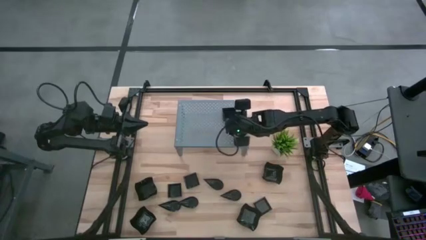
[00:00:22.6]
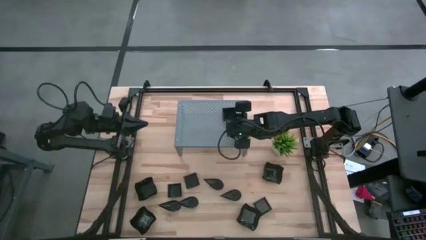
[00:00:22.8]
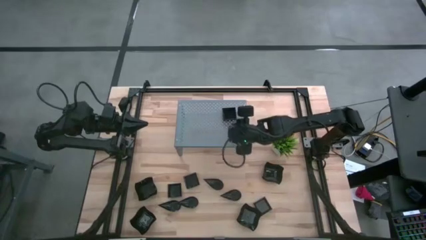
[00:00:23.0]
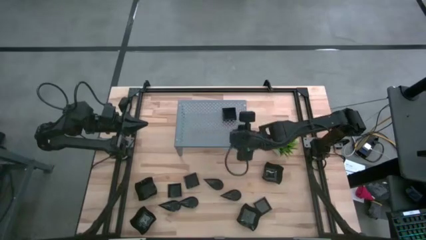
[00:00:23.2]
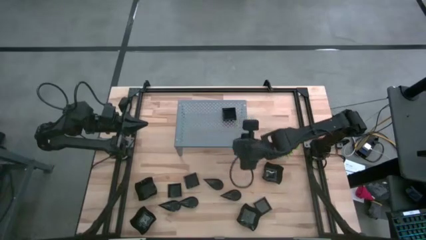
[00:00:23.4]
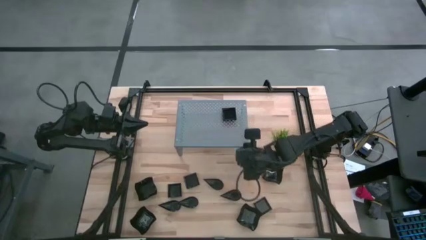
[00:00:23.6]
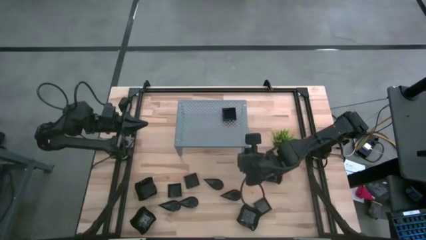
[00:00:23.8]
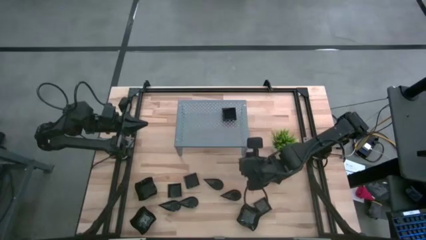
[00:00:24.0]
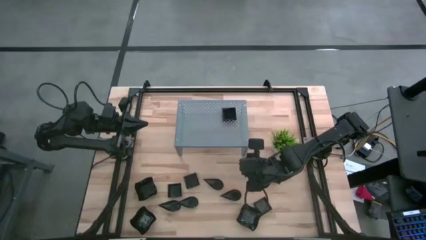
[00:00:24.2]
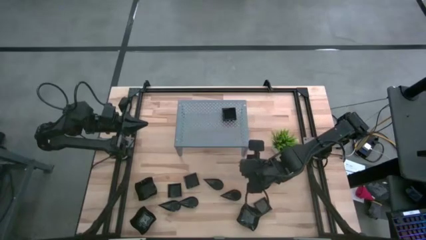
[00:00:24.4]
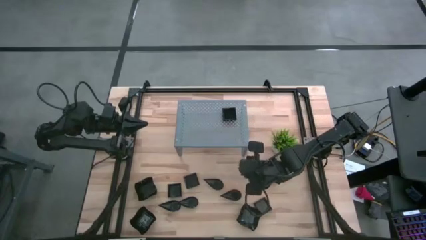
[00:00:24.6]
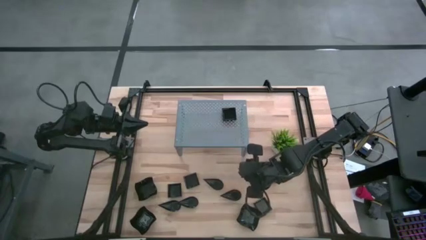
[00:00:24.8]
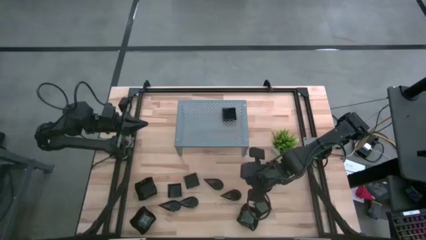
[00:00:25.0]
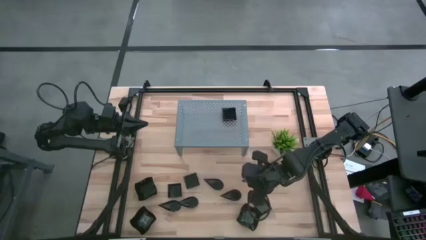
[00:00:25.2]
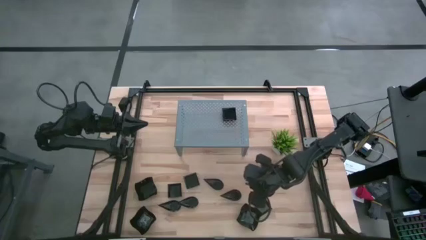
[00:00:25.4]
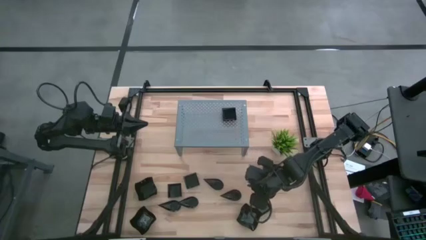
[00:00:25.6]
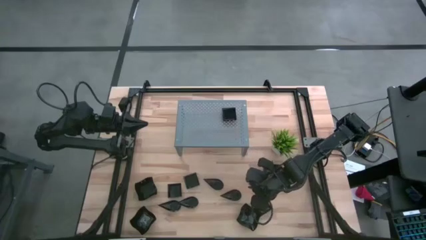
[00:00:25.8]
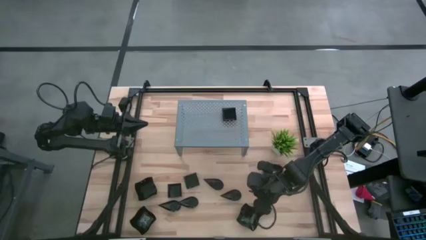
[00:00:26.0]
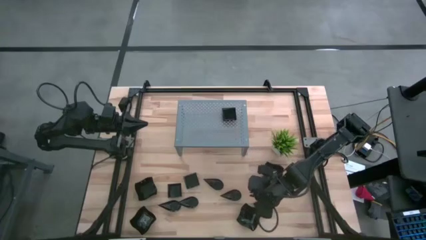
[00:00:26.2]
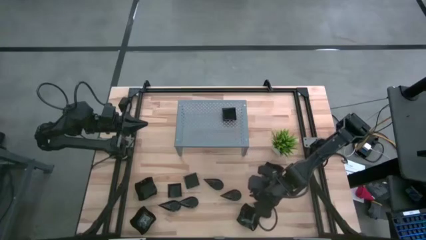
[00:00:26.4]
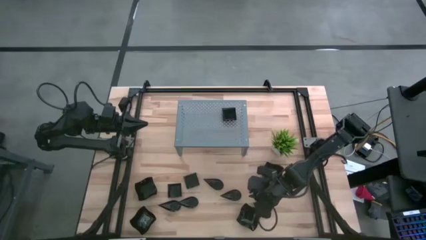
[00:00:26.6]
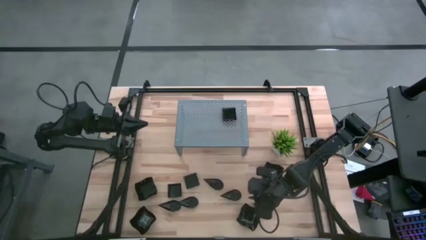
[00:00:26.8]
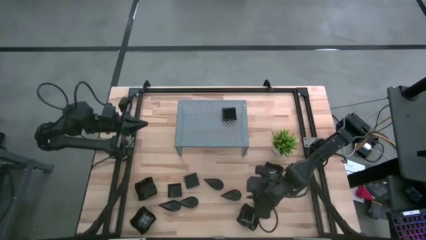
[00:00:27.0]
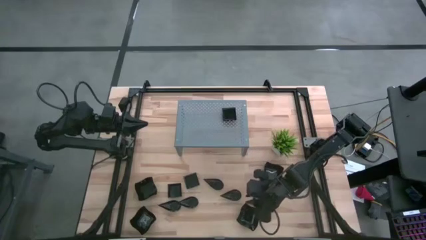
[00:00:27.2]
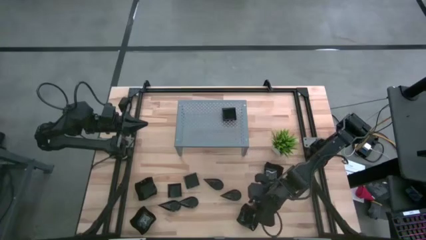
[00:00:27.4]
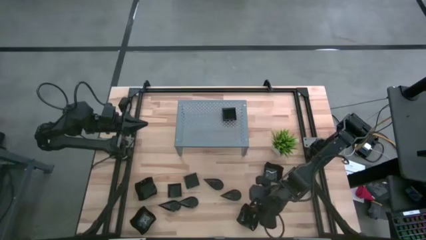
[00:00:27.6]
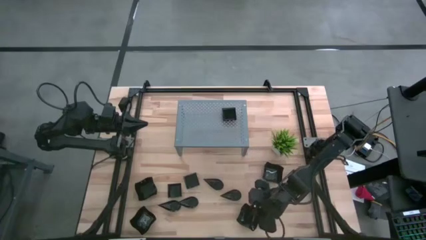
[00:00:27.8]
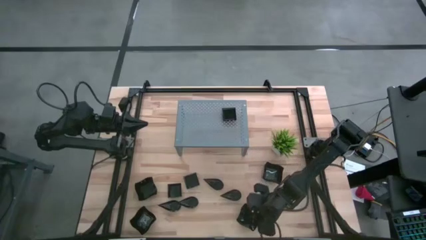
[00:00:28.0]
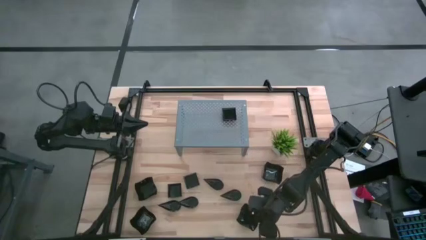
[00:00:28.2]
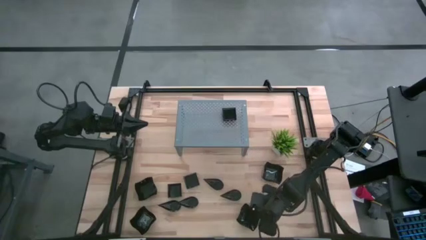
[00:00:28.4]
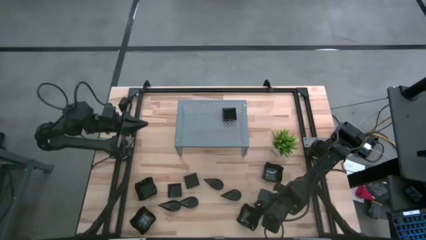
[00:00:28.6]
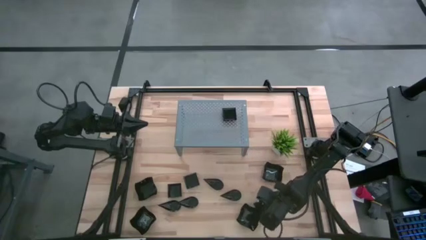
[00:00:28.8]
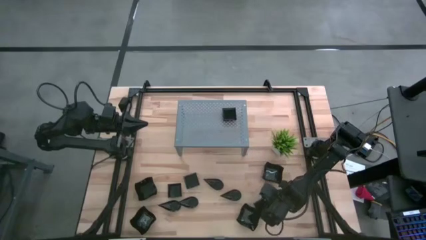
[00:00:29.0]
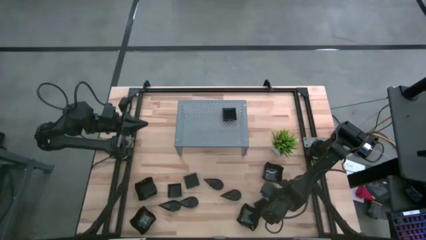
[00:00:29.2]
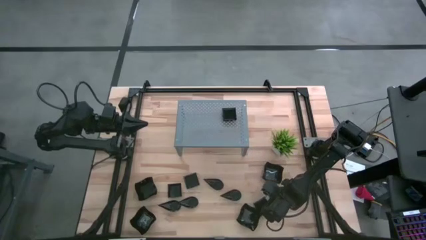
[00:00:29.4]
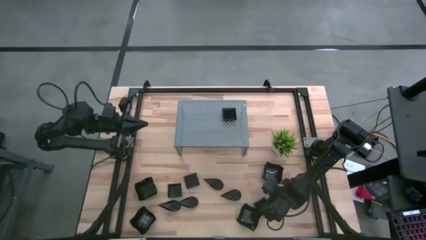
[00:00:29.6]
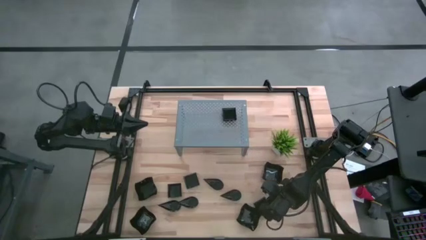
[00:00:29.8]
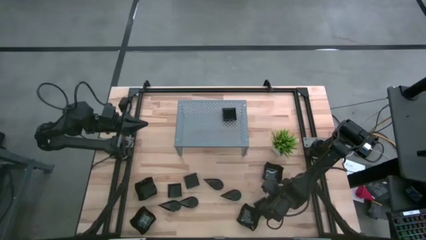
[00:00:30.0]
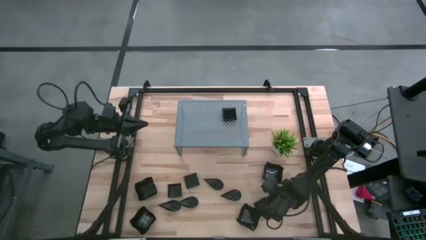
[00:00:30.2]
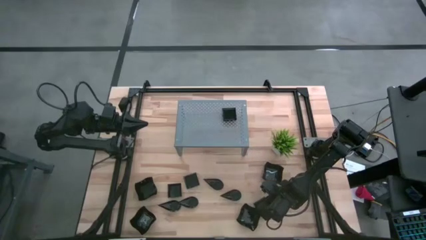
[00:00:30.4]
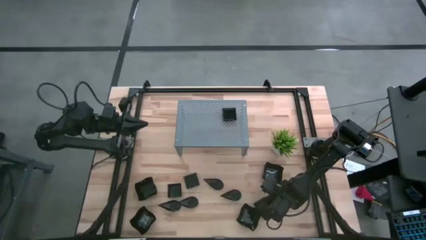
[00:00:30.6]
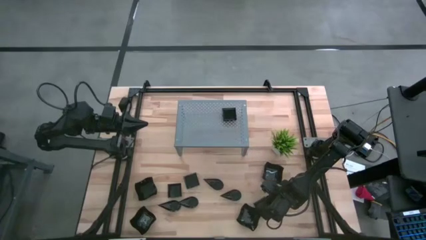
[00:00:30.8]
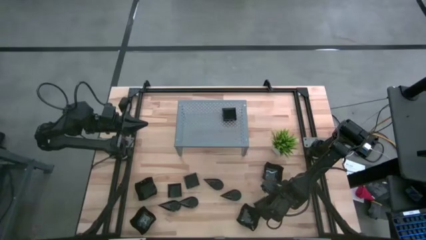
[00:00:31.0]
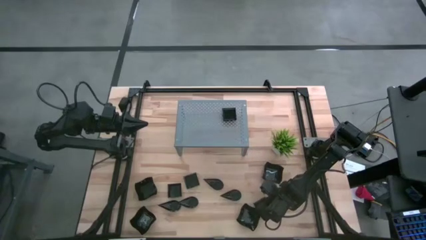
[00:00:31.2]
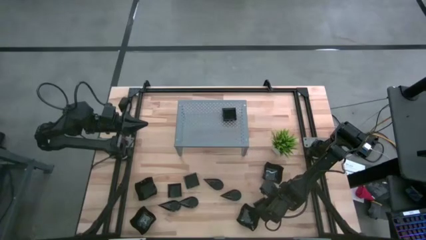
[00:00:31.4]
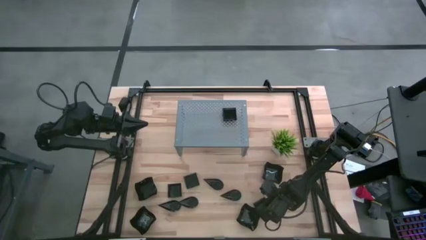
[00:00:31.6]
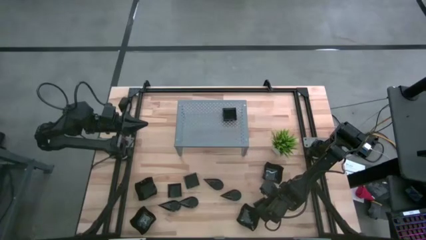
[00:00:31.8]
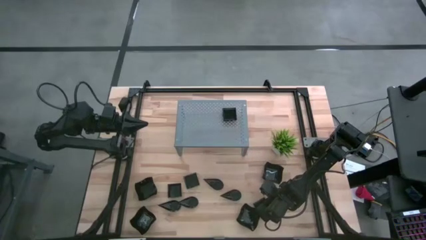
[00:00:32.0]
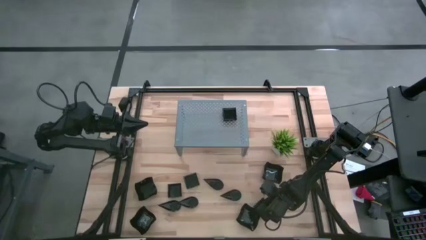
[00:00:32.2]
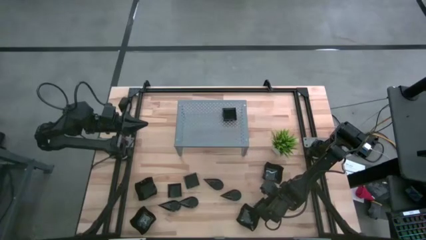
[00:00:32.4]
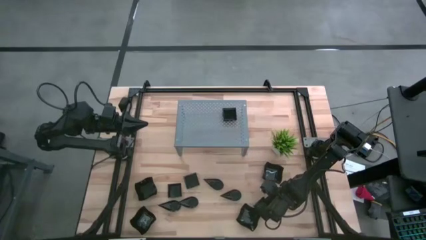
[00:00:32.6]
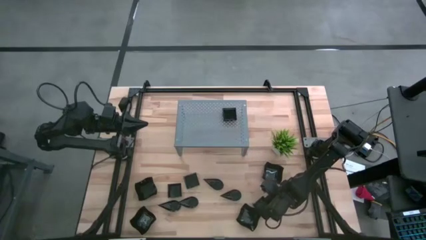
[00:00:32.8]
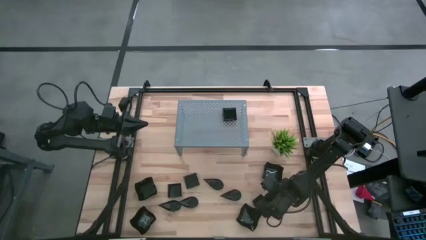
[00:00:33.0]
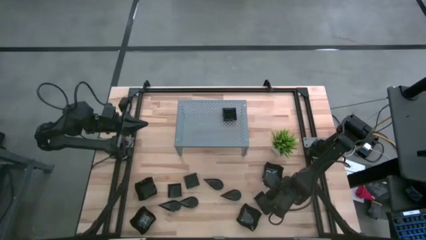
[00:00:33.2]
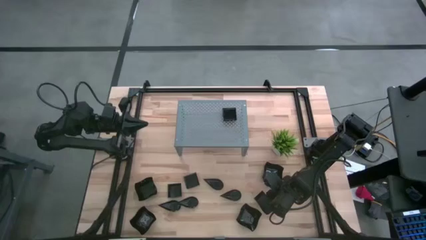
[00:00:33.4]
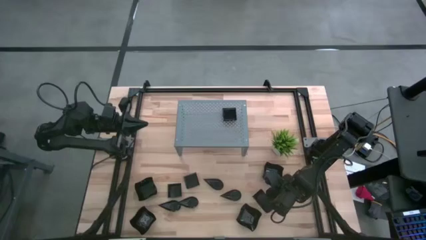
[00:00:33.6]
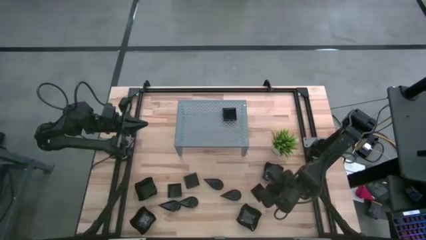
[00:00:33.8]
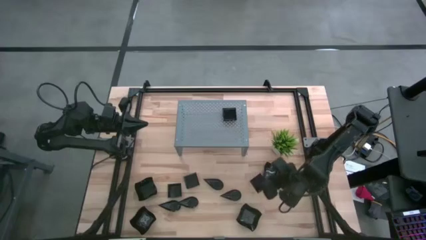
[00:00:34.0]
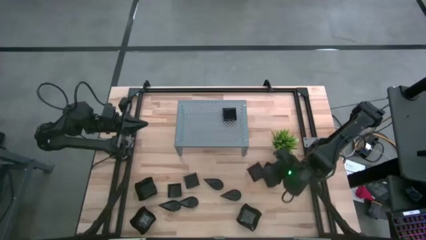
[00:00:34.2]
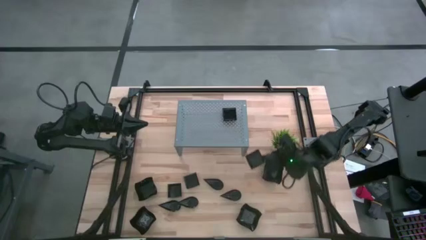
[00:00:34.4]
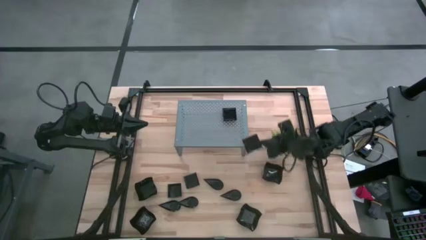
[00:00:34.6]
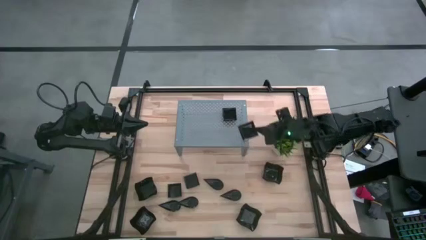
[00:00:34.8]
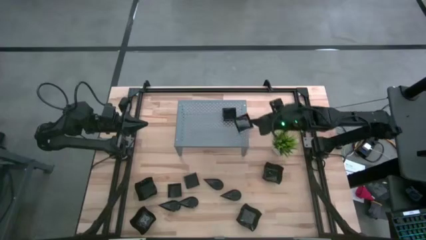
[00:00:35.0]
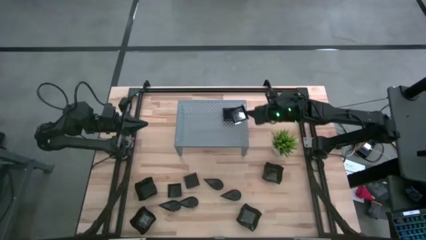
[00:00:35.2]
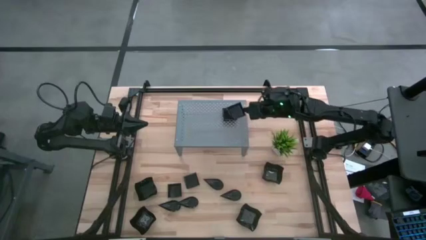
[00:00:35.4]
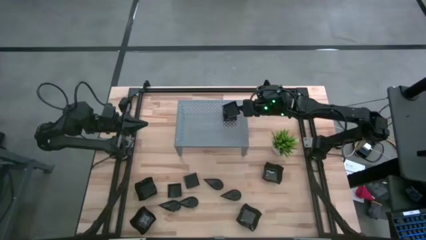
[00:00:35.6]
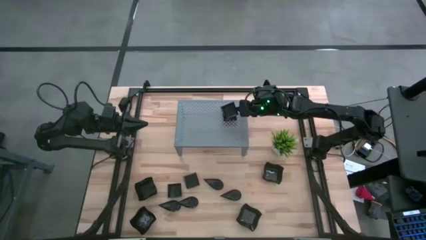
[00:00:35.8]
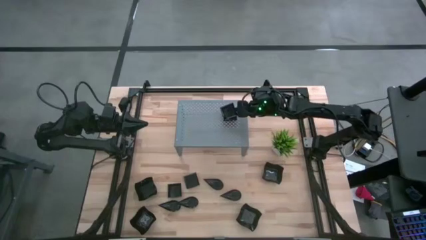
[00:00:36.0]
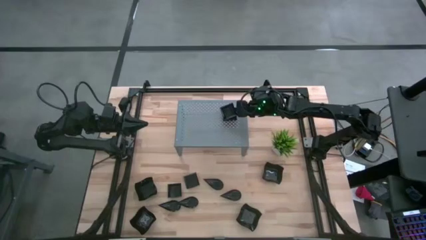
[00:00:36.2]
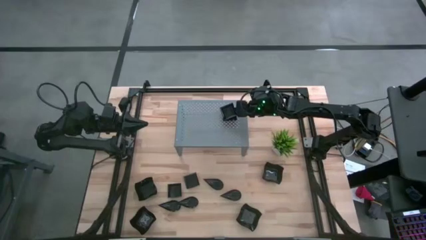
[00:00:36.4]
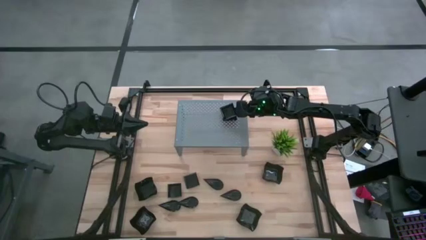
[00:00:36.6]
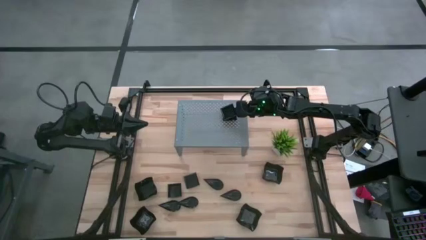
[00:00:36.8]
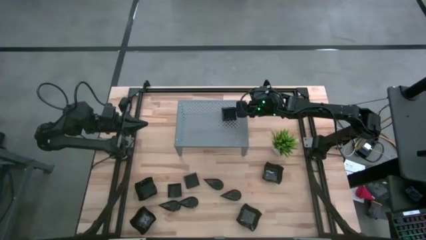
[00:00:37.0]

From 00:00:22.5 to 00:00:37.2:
Task: Pick & Place Mini shaped plates
Stack the square plate on top of the square plate on the shelf
